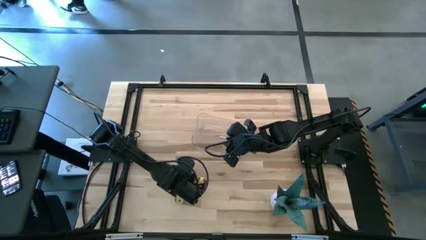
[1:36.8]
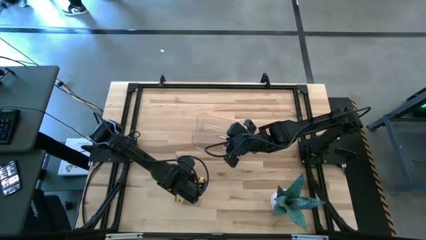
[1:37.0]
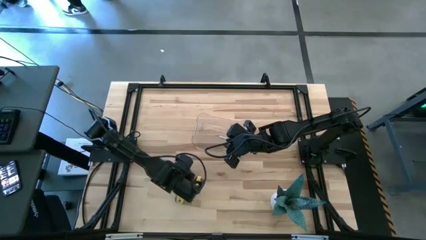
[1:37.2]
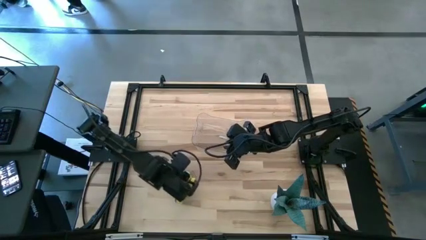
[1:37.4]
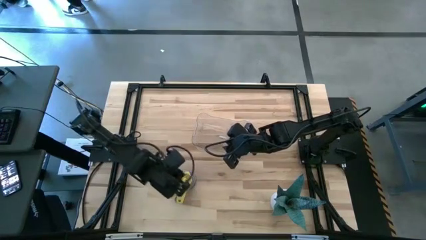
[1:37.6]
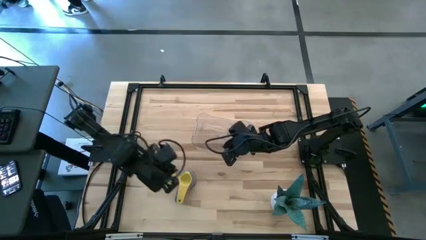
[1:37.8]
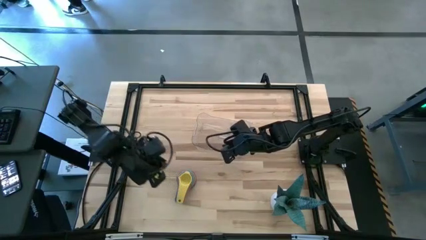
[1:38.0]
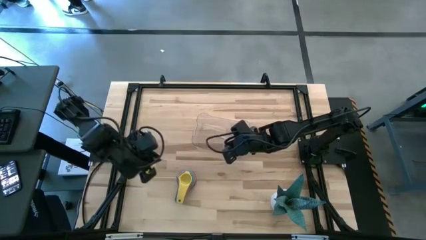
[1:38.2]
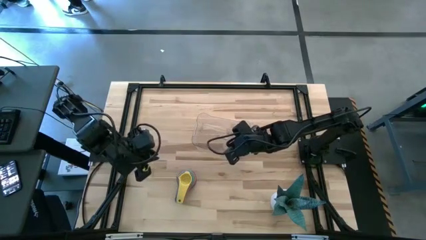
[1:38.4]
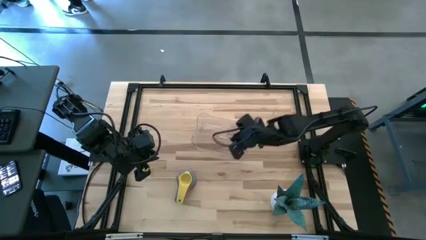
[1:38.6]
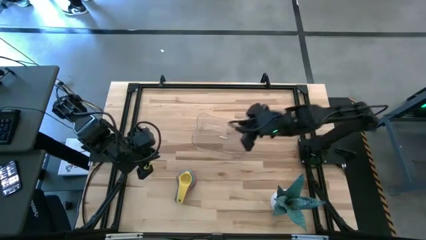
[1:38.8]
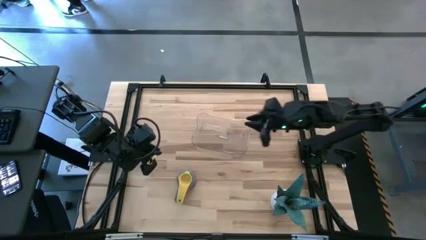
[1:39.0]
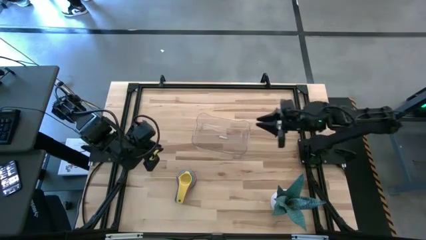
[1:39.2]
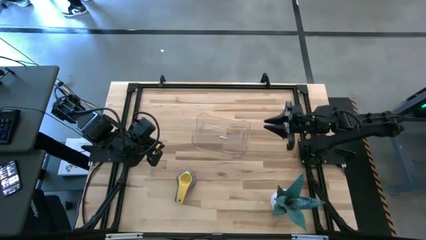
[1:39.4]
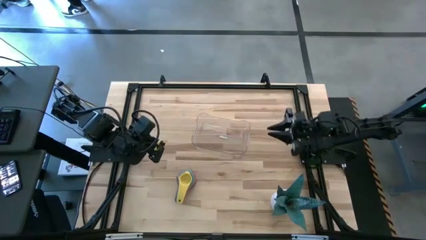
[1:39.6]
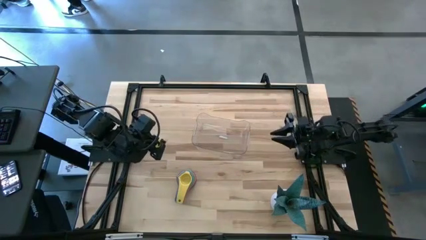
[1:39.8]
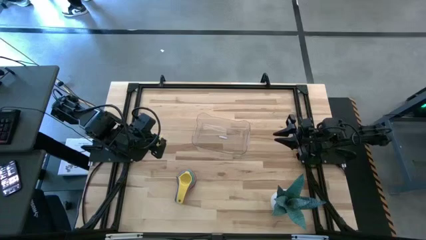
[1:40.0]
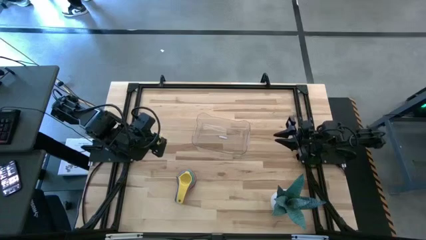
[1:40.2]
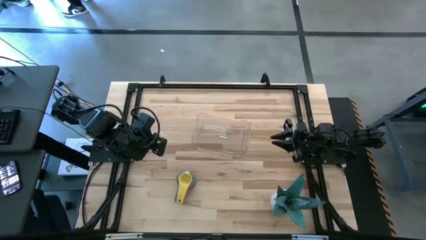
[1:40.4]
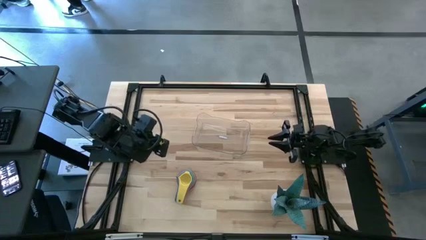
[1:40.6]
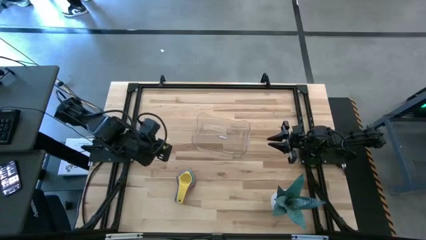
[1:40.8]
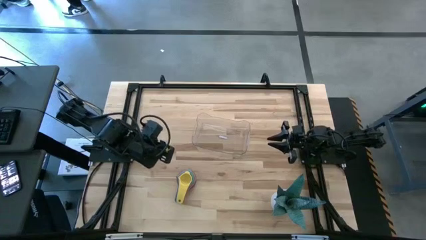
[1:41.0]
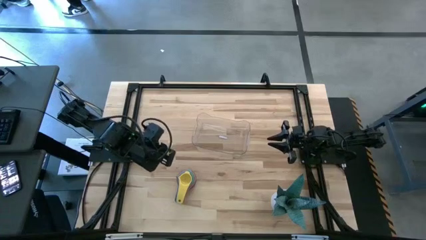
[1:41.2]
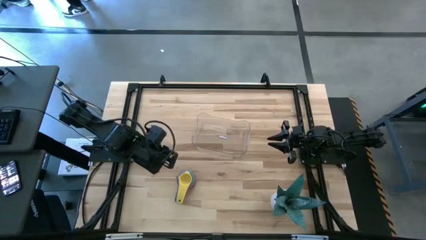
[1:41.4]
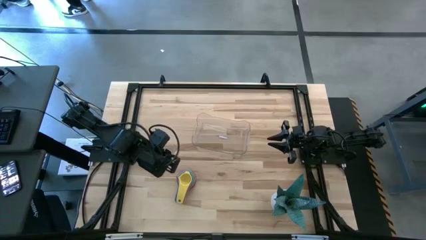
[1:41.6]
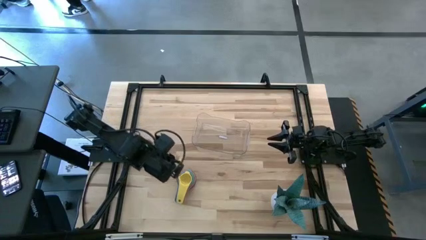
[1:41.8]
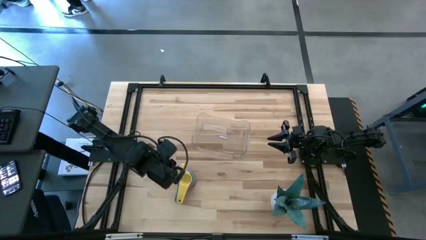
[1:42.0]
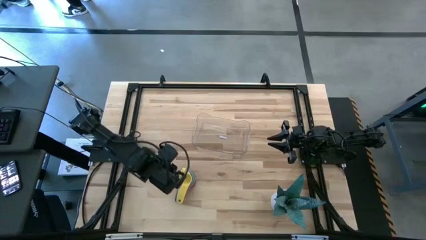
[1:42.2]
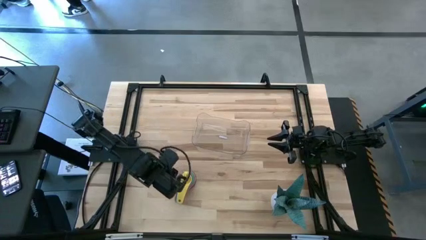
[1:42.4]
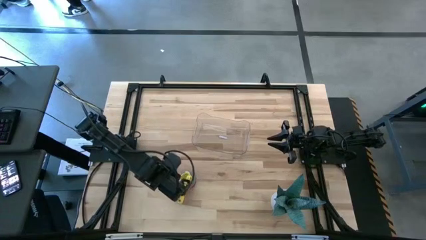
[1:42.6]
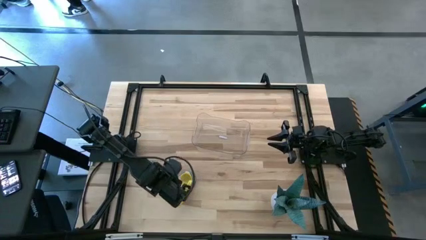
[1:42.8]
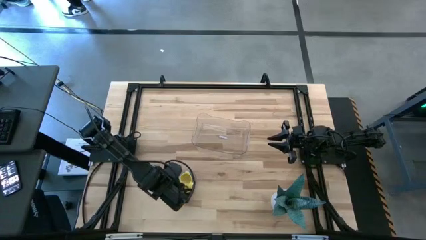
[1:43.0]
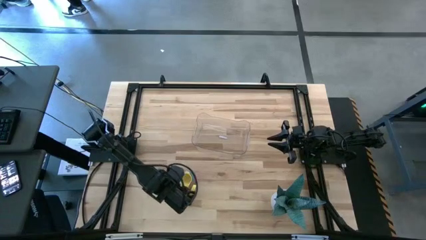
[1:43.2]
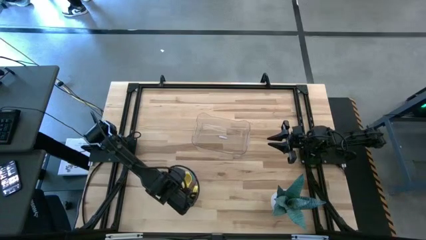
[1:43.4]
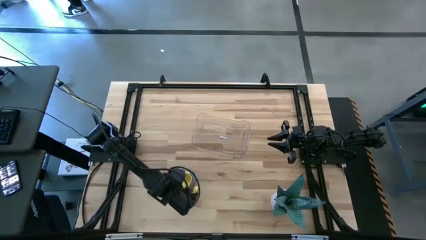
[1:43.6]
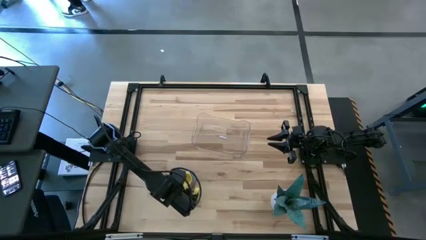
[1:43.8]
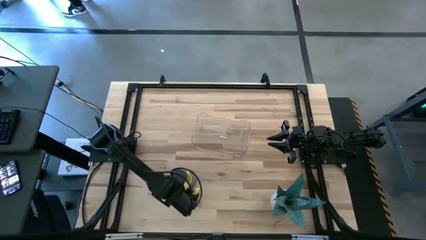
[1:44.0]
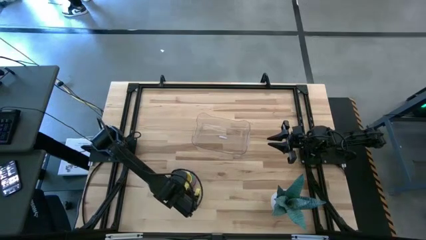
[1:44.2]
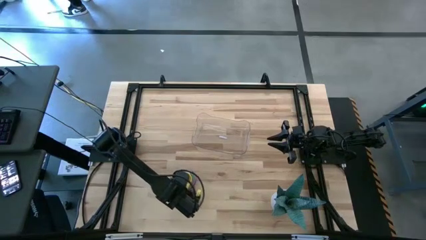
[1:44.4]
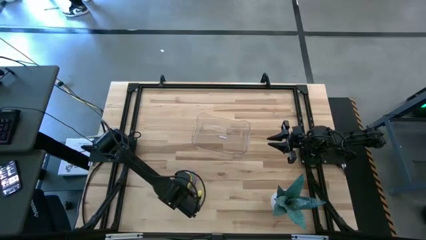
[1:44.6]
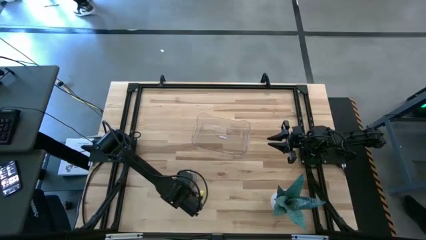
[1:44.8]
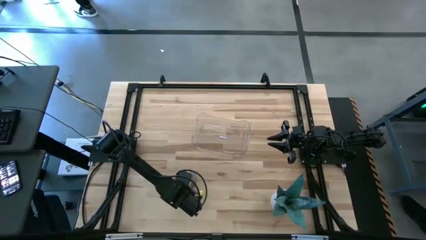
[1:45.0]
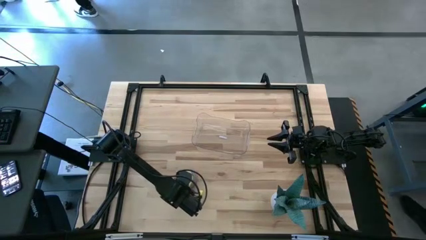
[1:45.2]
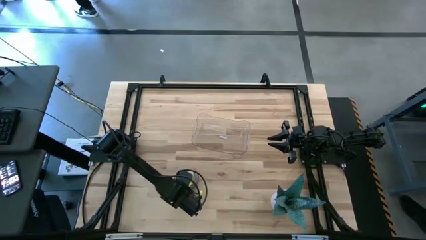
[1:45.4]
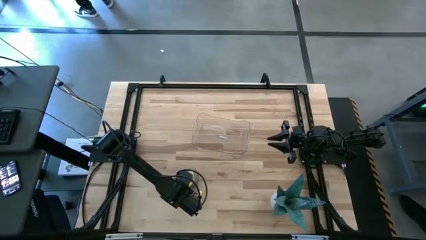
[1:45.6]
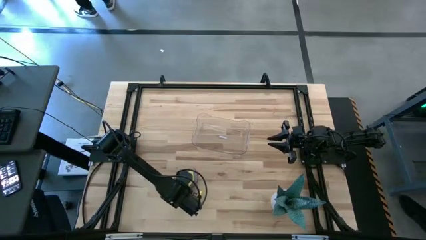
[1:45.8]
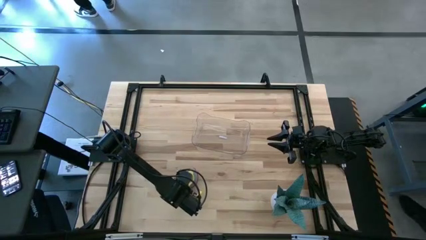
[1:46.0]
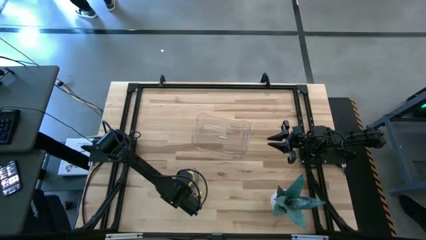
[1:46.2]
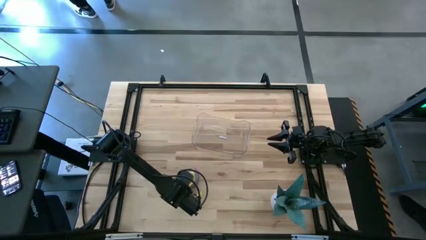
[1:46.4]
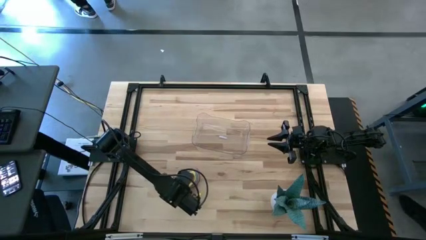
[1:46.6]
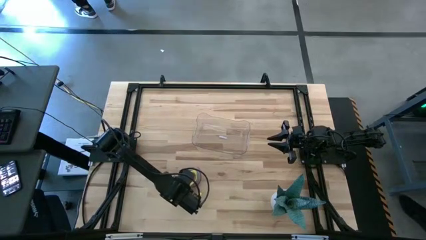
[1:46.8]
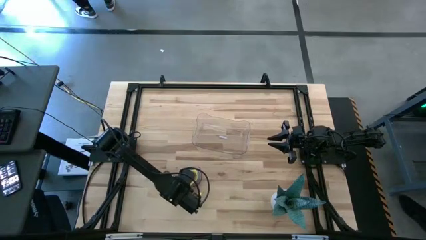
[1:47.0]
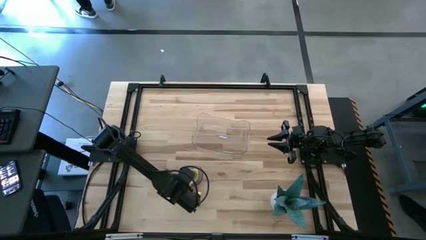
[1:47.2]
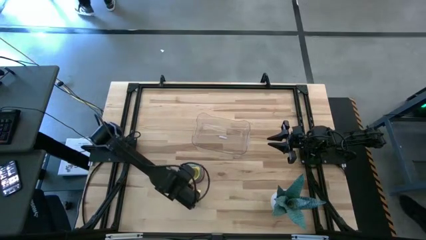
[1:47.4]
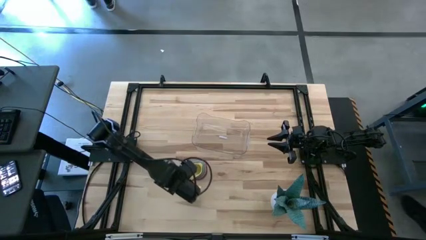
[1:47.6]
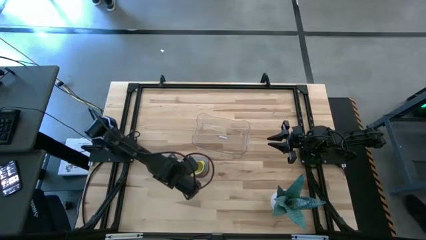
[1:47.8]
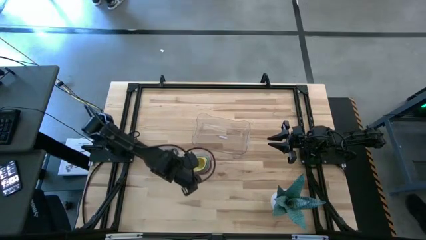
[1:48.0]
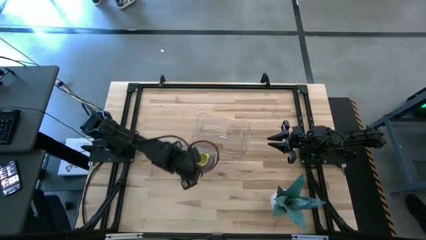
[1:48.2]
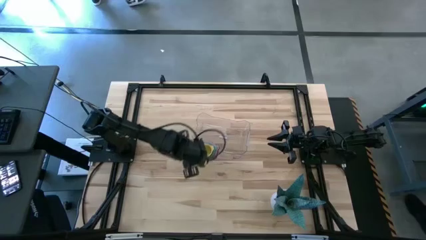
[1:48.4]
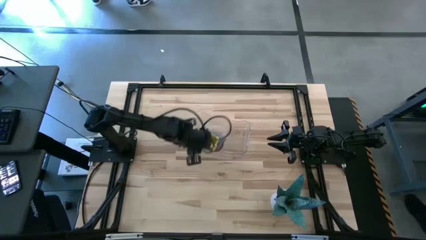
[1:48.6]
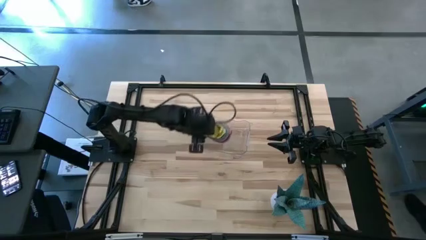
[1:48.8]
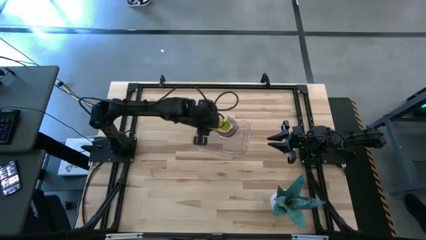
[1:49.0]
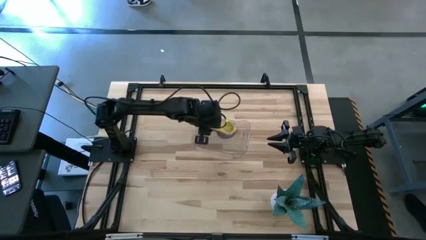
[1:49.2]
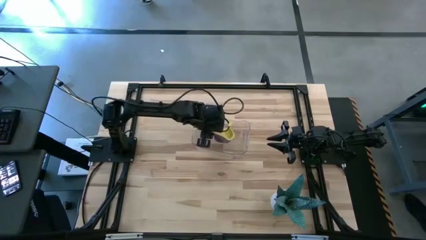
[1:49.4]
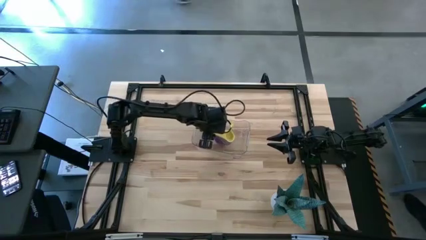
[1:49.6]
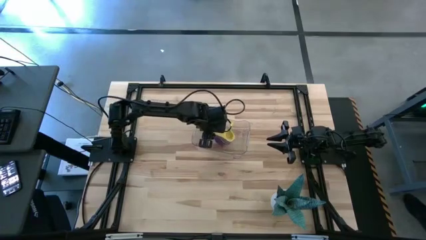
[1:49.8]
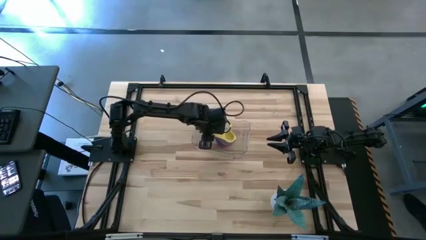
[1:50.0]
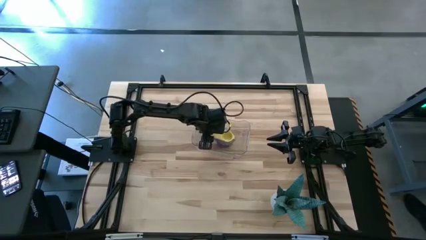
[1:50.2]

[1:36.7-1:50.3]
Task: Nest measuring cups in basket
Put the nested measuring cups into the transparent bin

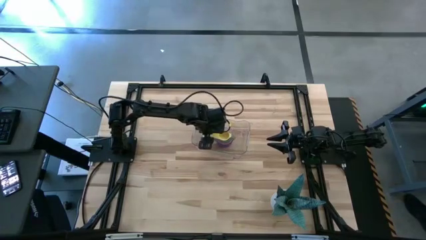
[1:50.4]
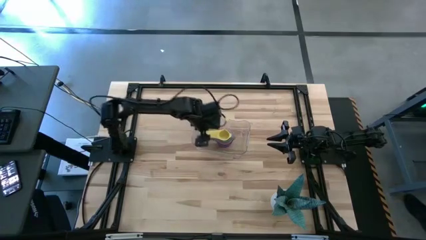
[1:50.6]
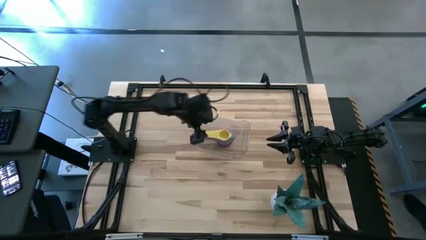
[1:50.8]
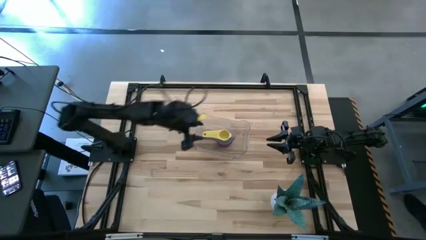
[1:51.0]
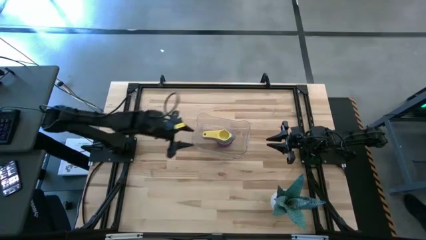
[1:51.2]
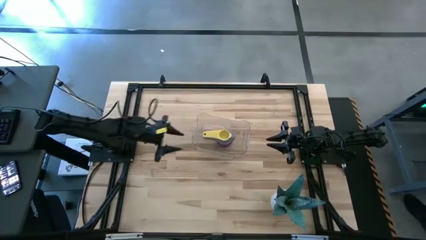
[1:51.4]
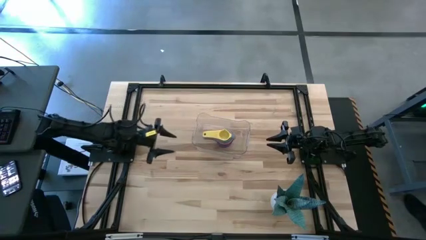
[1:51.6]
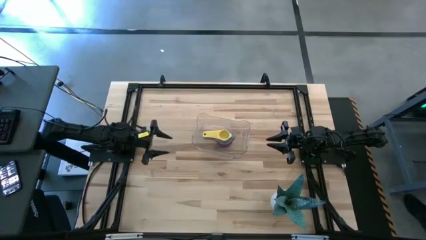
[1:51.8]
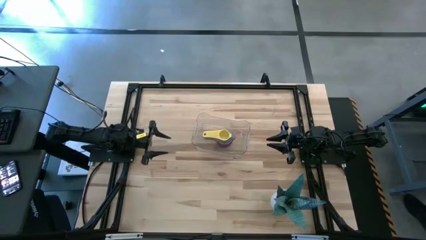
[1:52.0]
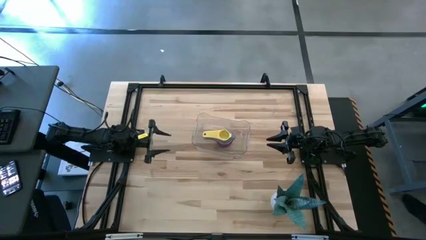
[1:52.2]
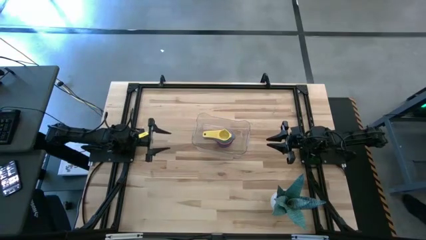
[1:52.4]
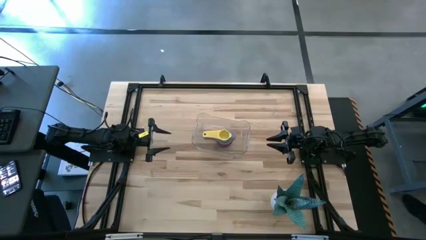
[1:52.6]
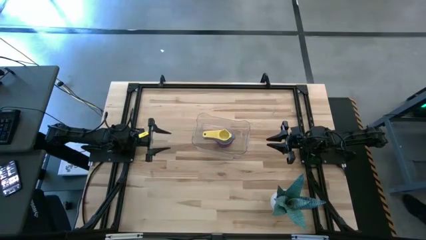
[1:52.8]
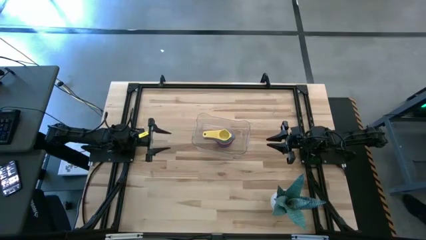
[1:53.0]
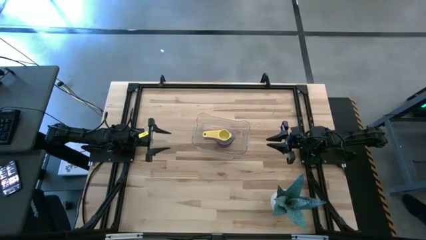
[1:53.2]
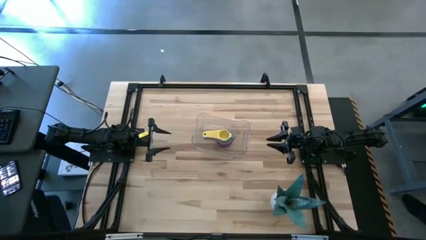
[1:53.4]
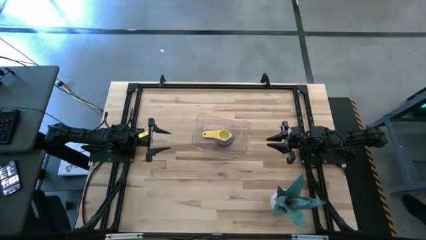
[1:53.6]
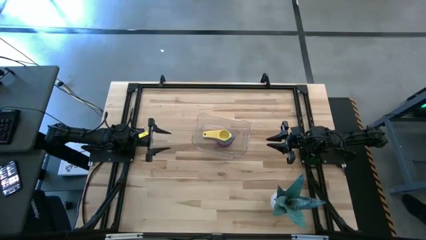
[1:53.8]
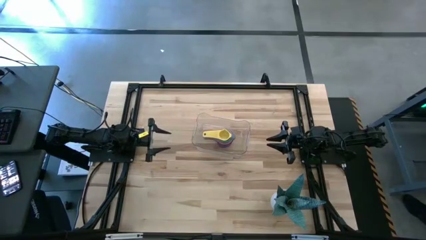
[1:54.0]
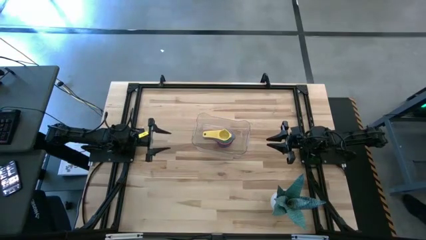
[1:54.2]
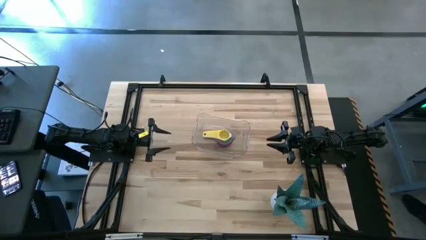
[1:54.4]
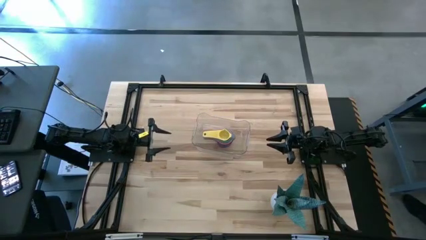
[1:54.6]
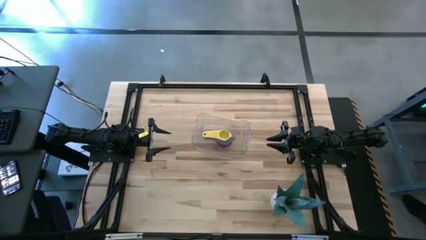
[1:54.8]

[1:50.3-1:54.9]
Return to Home Position
